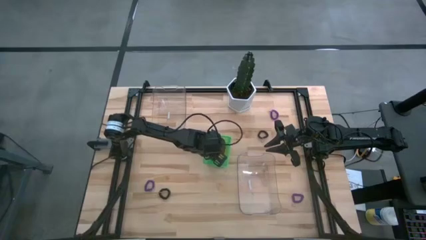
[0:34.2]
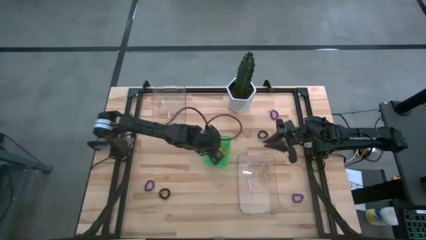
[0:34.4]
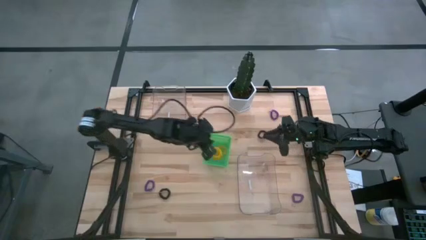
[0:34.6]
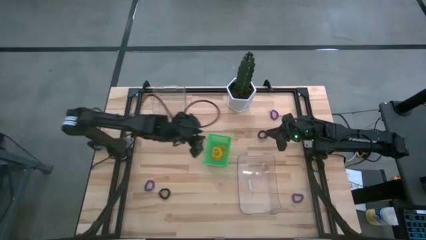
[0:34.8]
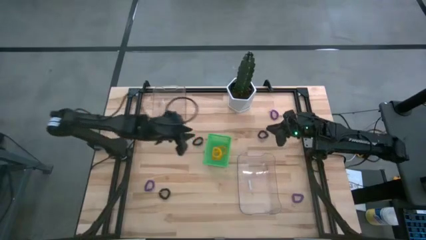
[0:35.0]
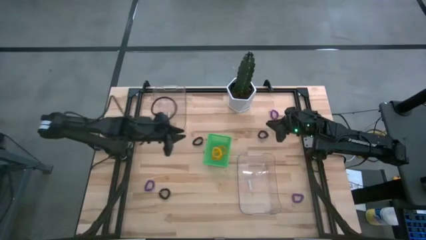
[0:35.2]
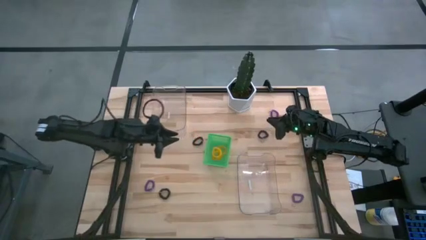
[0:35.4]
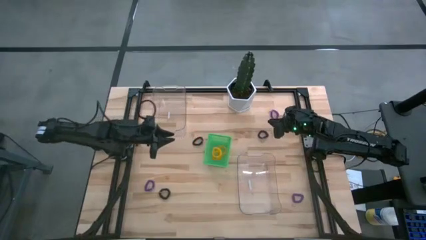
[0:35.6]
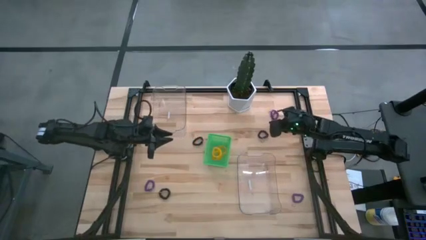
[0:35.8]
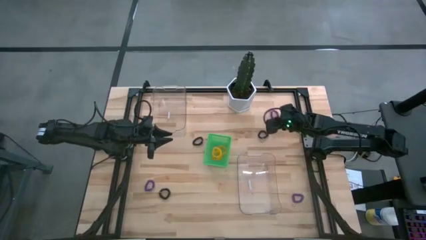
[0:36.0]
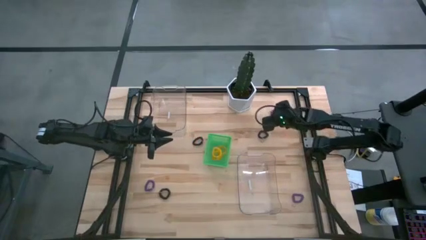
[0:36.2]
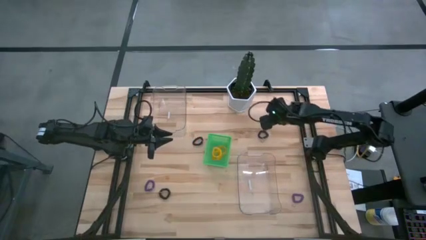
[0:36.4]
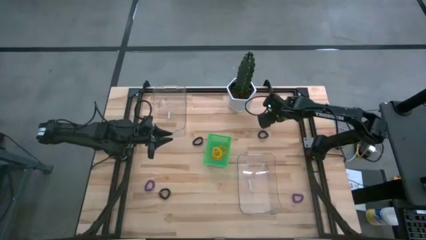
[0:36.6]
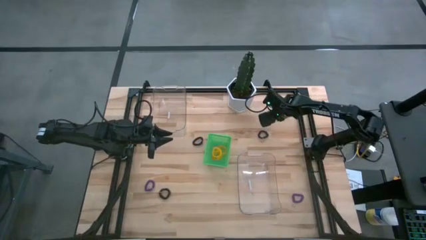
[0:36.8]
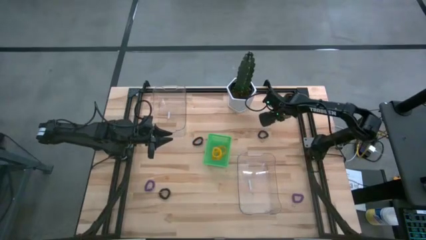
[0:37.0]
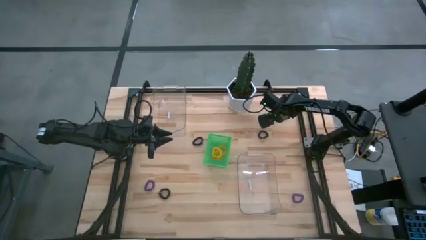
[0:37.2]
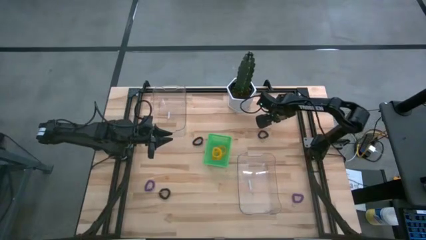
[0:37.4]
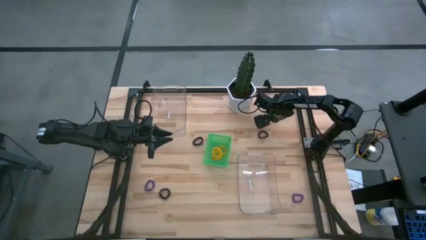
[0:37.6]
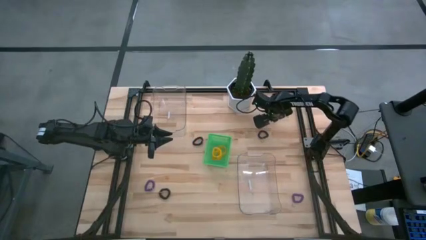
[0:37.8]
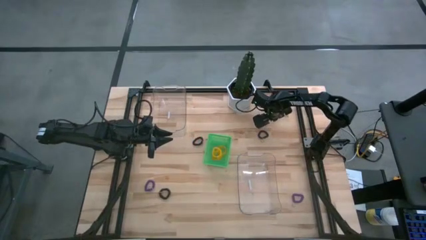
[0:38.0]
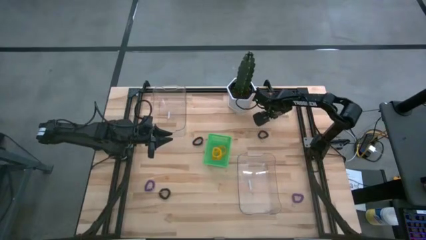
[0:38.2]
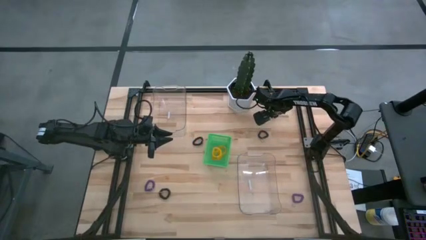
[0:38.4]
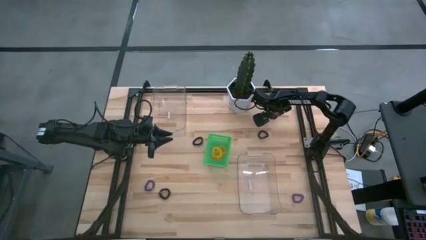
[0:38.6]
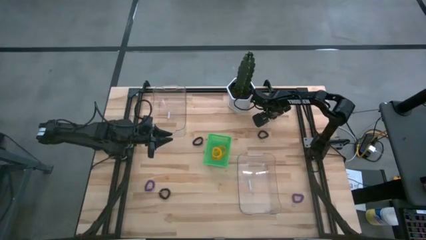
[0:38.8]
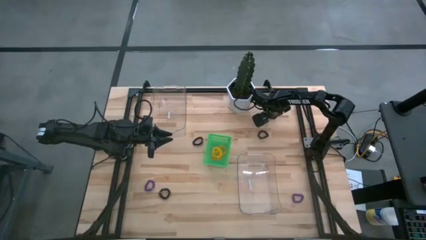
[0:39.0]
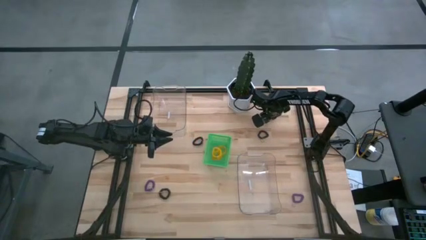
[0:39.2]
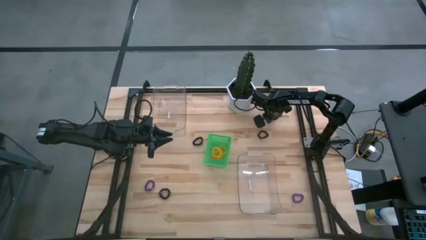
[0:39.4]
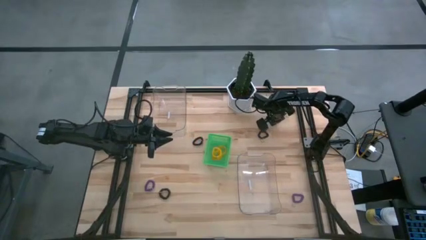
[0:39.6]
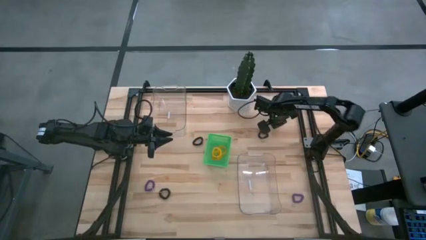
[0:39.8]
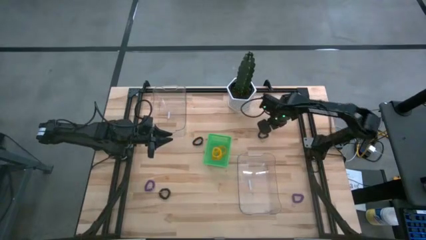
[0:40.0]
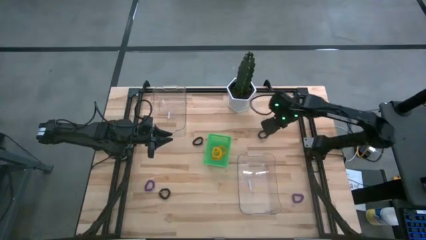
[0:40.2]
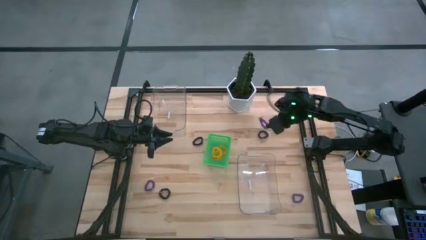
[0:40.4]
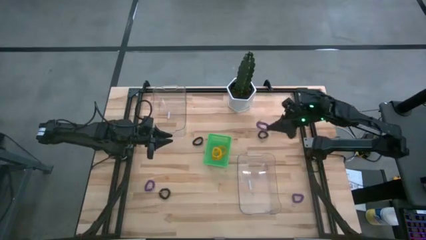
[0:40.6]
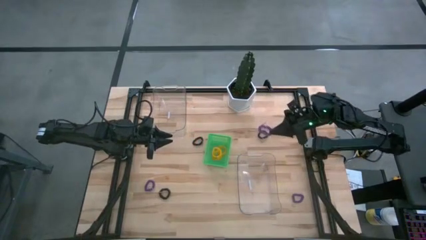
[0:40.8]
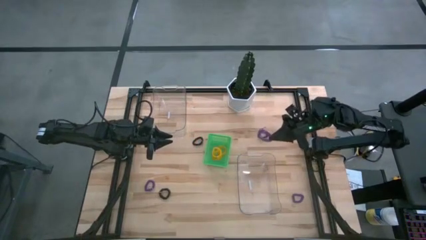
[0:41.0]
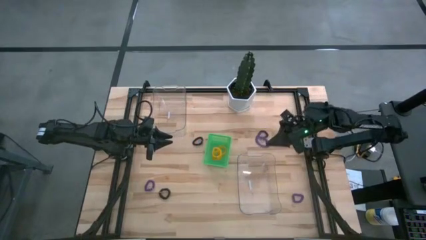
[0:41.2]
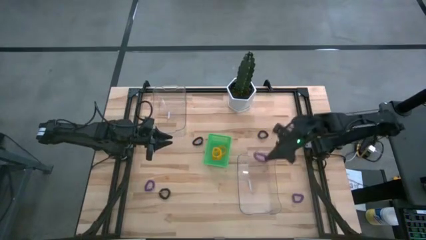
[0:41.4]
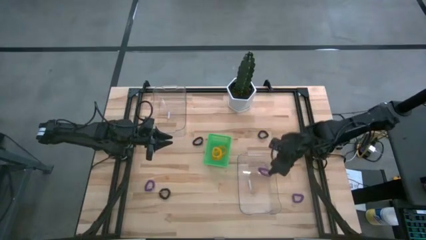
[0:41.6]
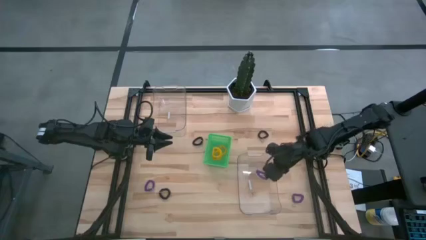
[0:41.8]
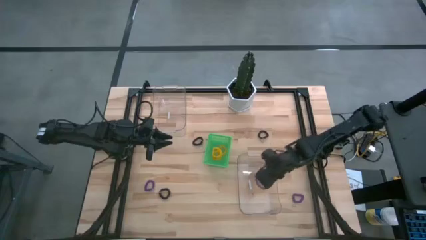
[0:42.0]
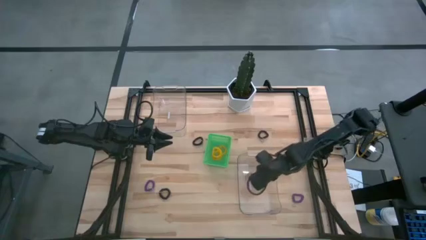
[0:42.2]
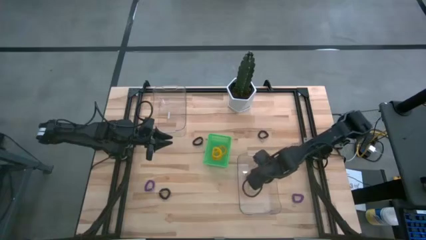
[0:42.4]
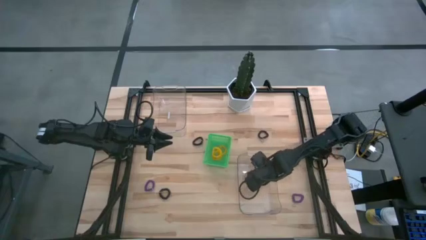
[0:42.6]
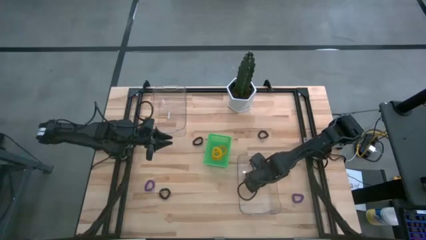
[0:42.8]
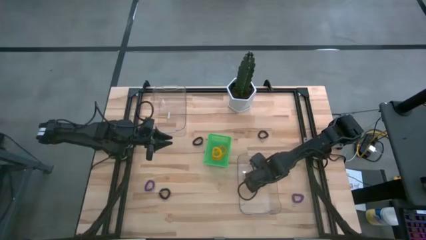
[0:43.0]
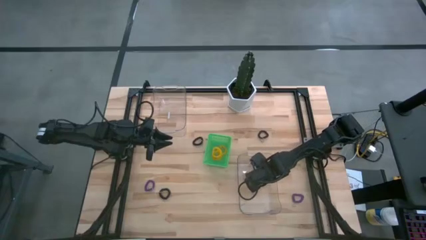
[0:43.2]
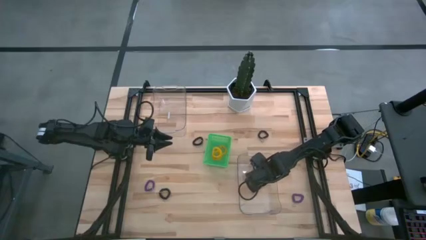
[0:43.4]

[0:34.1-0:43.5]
Task: Sort spring keychains
Put the top right purple spring keychain into the right transparent bin

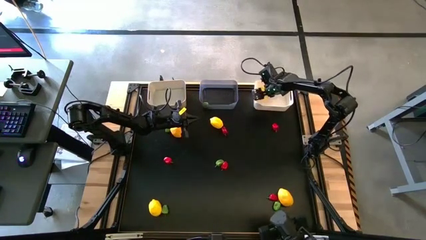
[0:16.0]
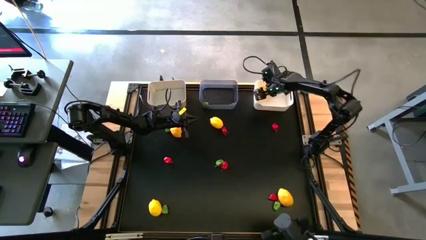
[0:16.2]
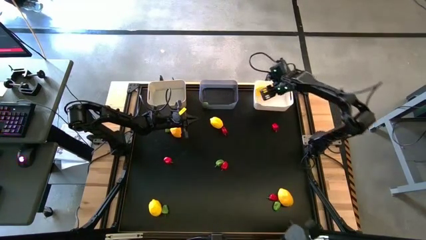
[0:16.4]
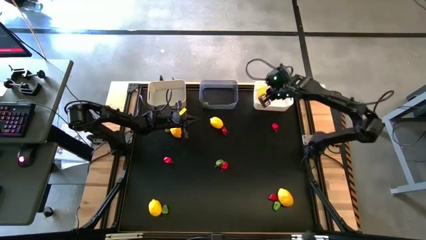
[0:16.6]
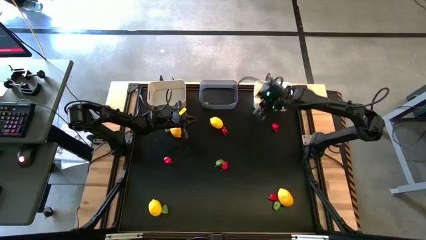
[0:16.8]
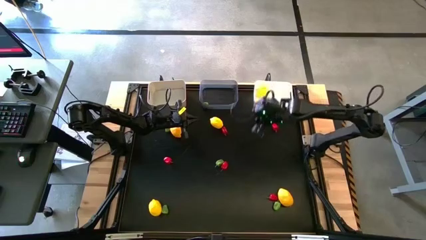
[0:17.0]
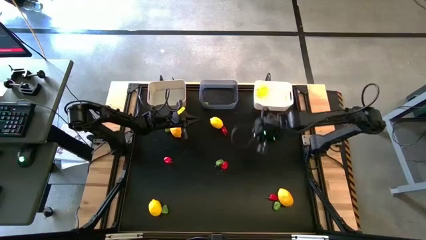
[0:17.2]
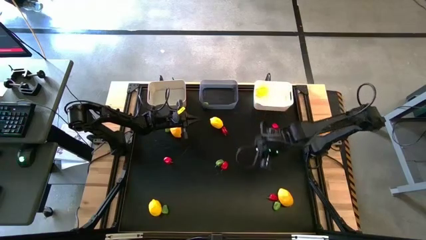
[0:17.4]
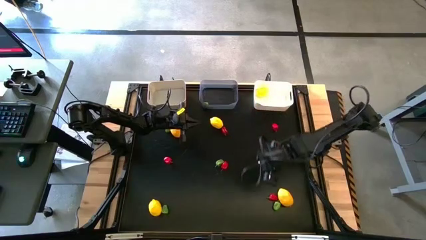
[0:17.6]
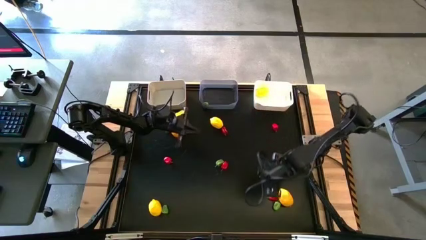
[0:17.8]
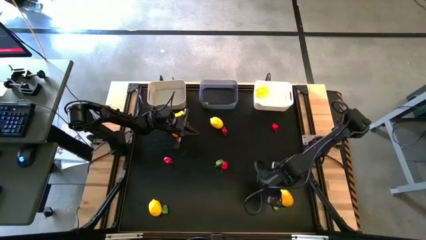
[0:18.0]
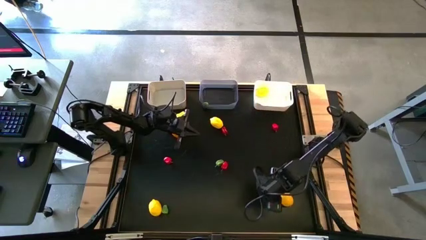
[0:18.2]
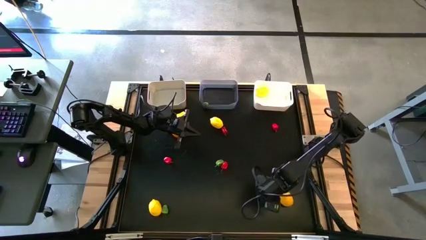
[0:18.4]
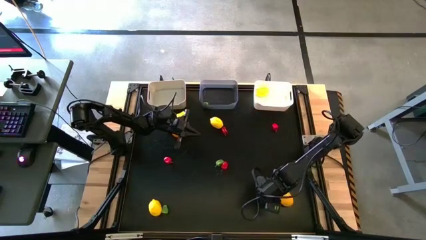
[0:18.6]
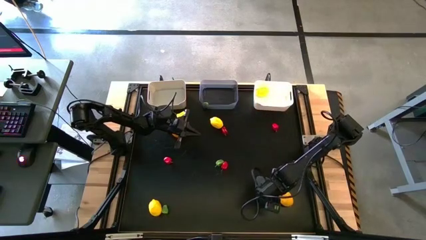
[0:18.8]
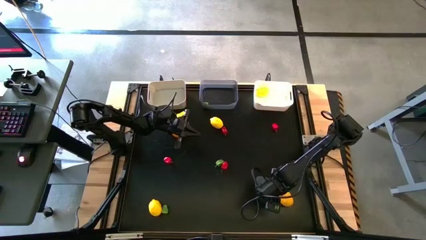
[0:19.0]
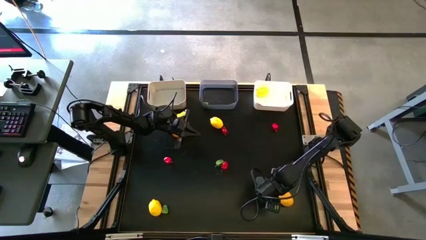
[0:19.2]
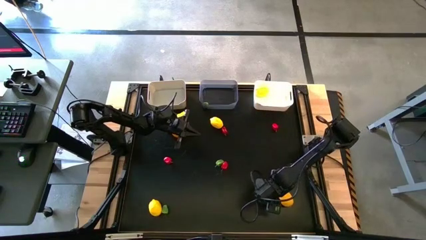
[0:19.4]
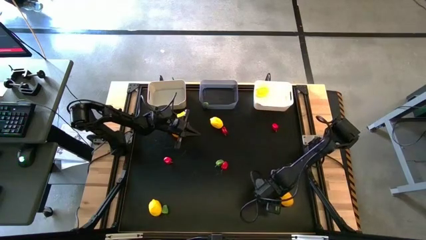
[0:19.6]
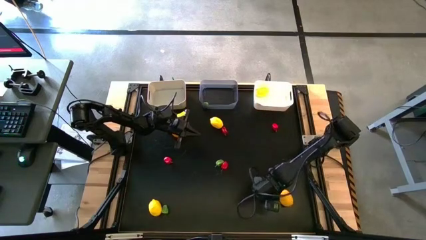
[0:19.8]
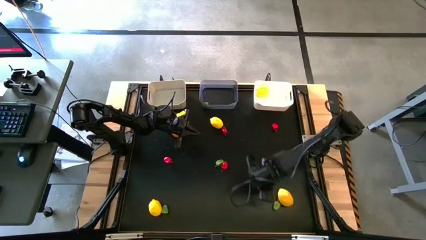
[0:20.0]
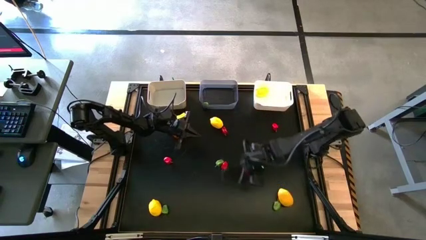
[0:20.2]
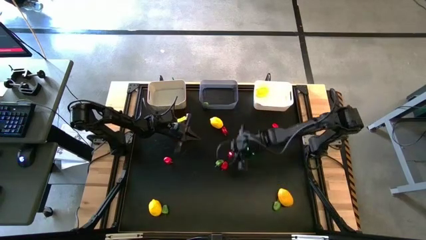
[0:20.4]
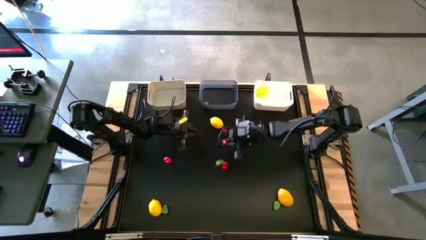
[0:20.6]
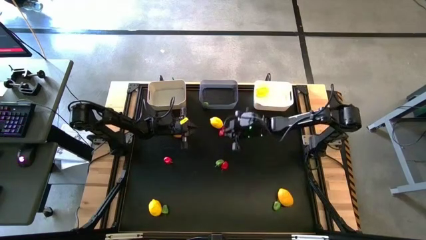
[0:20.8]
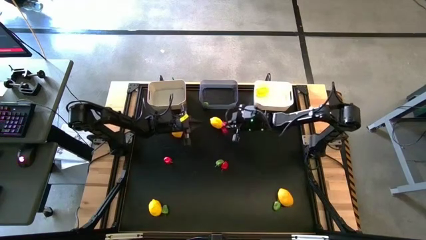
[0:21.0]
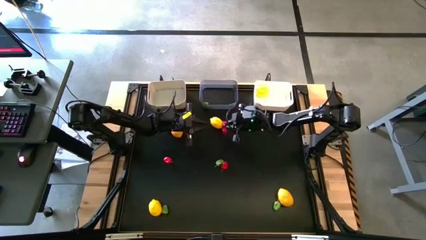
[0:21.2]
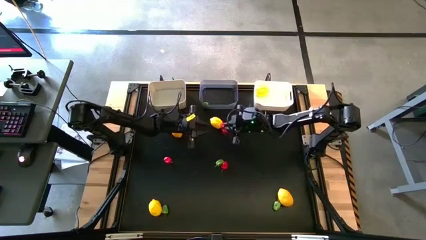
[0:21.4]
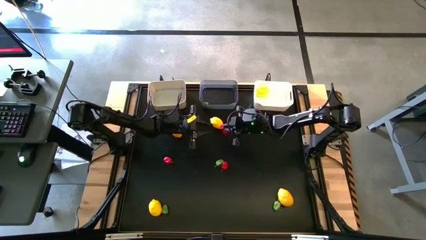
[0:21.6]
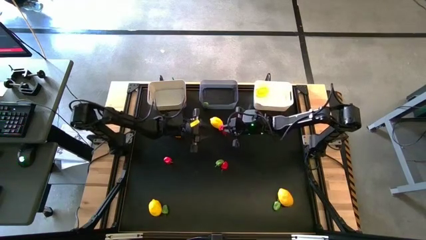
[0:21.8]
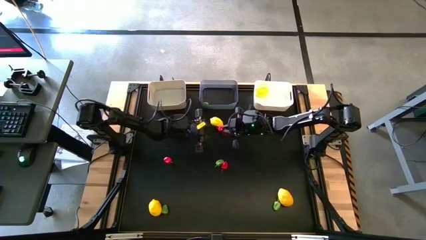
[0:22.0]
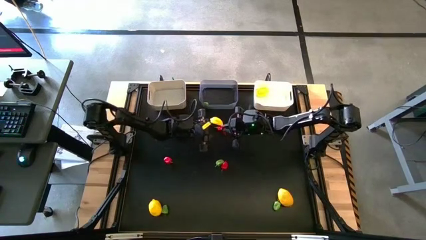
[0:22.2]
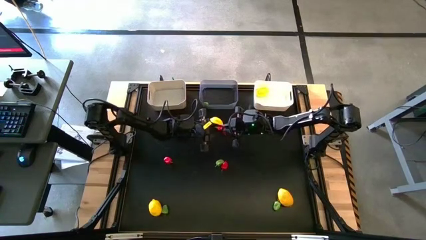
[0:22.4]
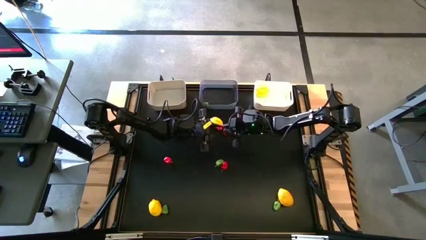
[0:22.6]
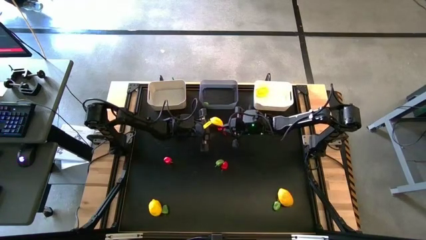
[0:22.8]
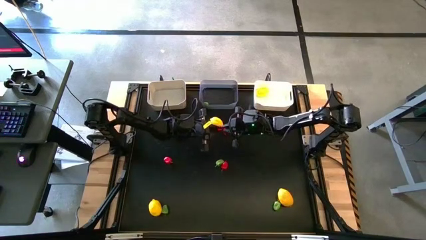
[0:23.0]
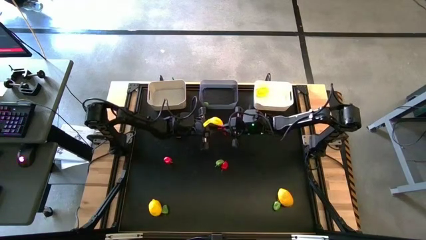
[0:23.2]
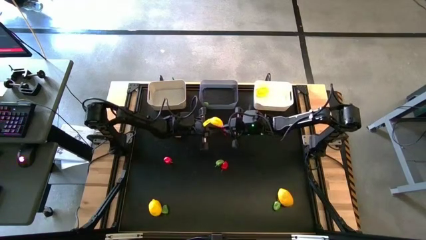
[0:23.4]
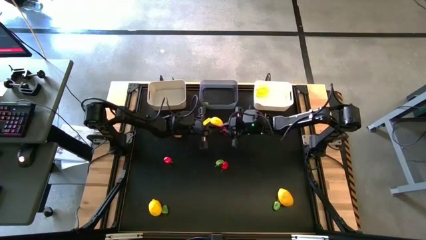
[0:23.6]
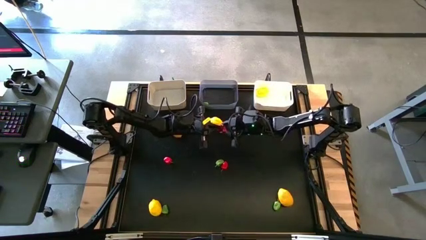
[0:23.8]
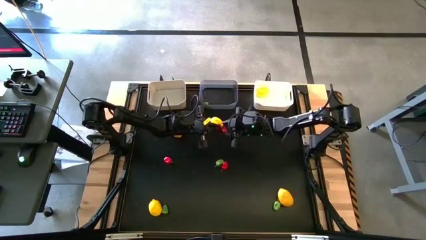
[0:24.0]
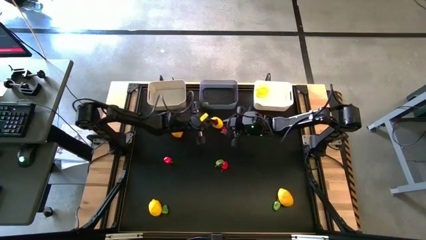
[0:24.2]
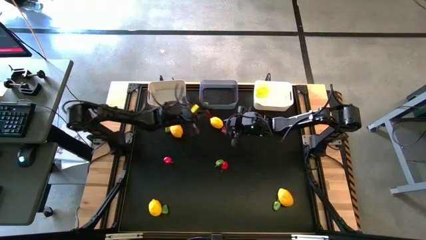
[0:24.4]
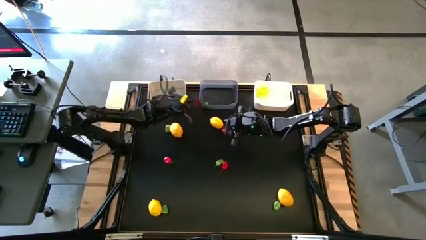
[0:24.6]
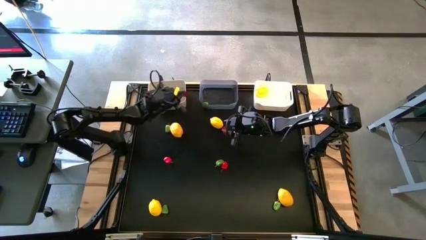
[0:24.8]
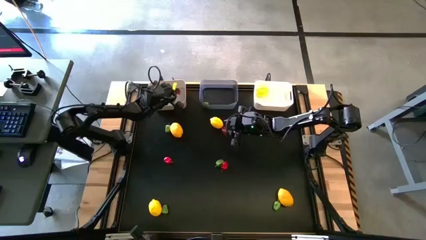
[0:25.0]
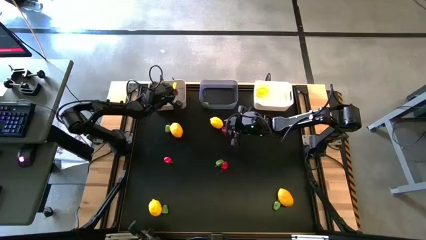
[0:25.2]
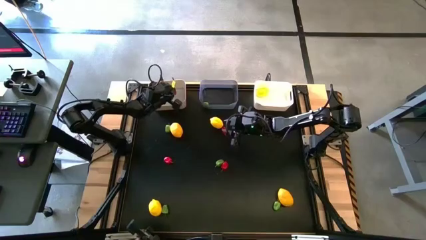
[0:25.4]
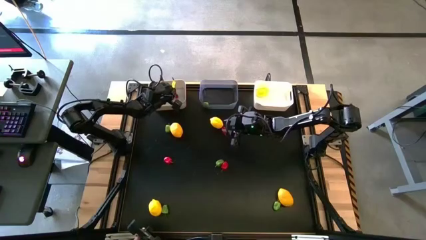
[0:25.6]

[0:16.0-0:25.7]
Task: Sort produce into baskets
Put the red bell pepper into the gray bin
